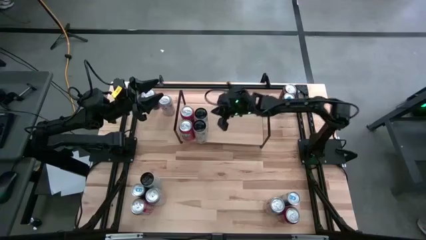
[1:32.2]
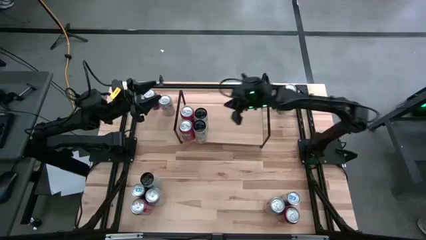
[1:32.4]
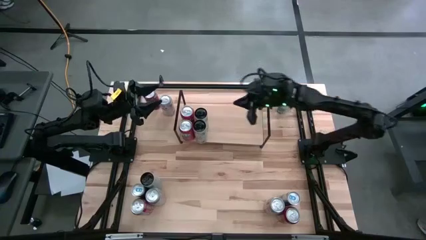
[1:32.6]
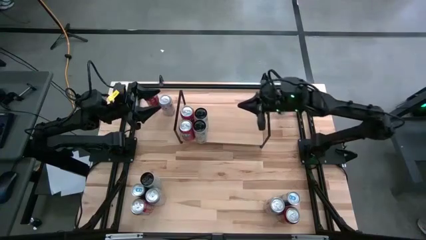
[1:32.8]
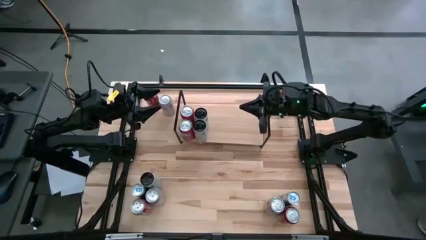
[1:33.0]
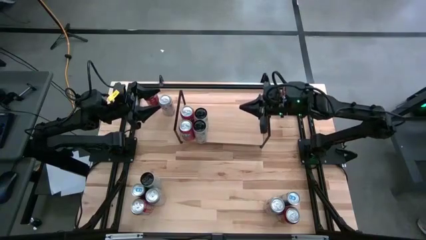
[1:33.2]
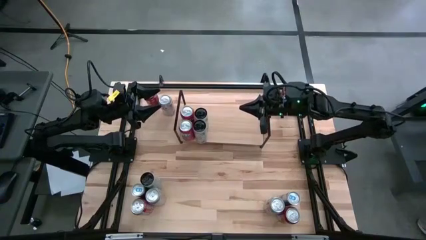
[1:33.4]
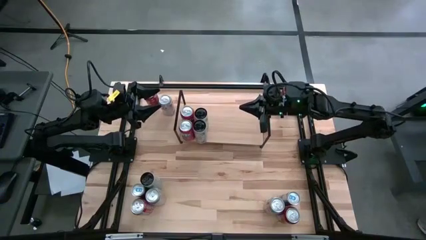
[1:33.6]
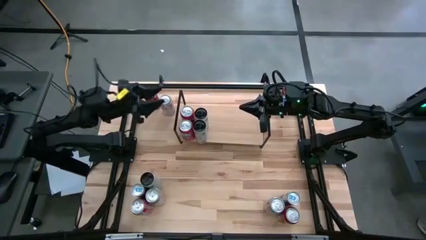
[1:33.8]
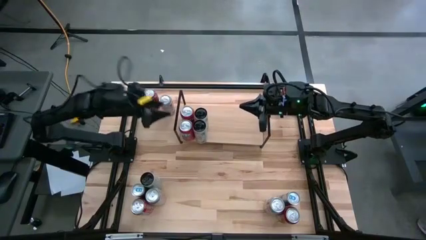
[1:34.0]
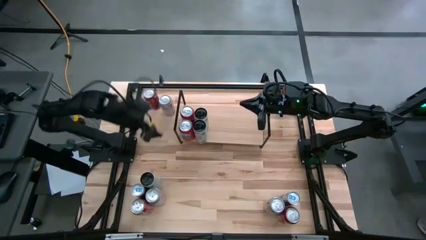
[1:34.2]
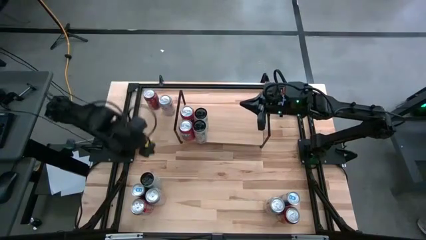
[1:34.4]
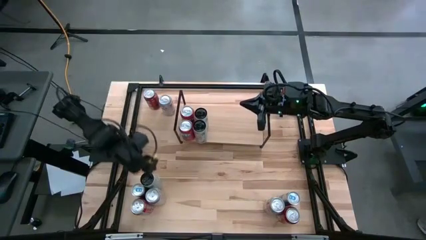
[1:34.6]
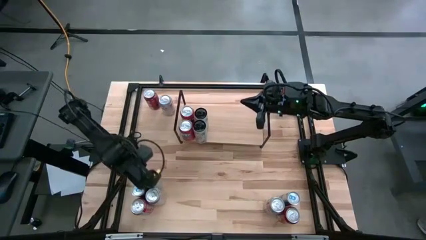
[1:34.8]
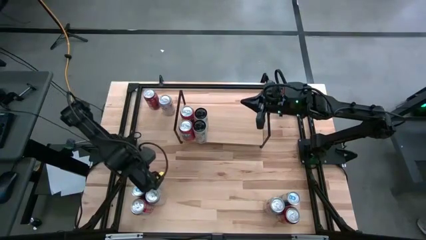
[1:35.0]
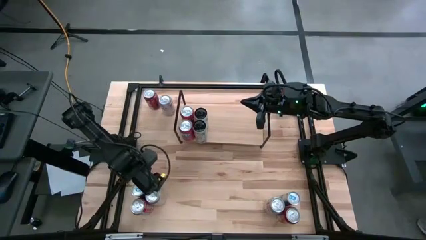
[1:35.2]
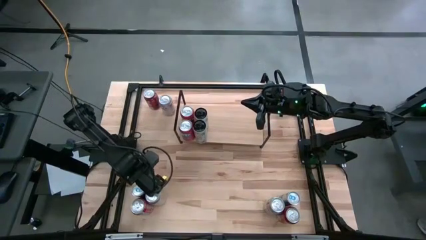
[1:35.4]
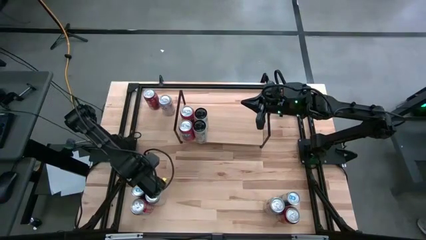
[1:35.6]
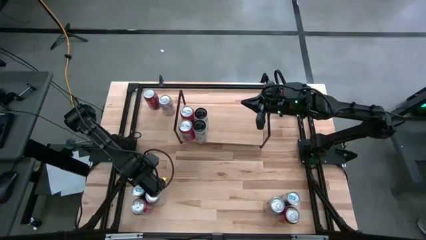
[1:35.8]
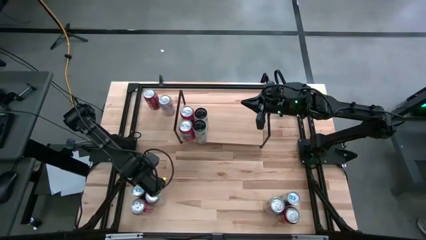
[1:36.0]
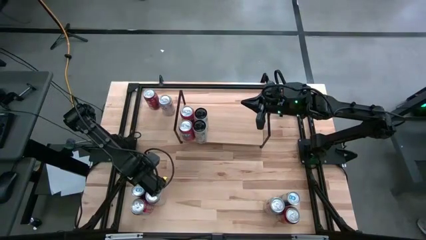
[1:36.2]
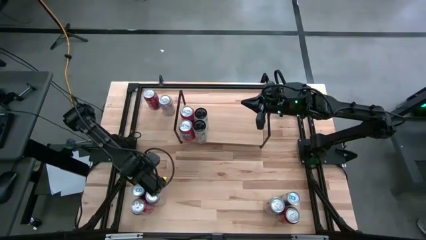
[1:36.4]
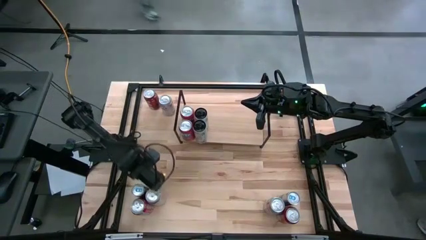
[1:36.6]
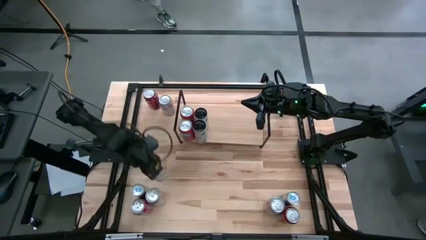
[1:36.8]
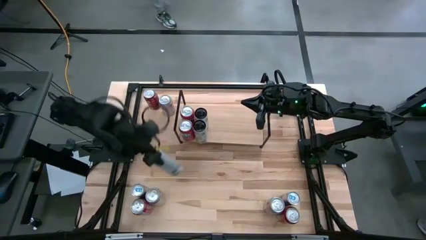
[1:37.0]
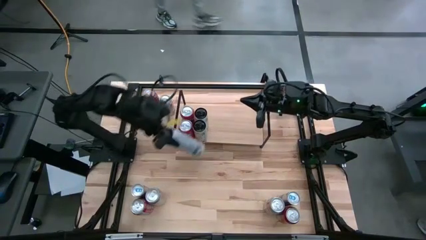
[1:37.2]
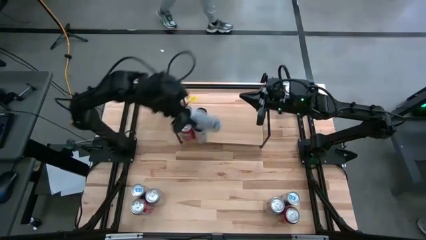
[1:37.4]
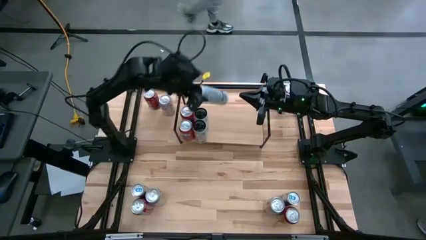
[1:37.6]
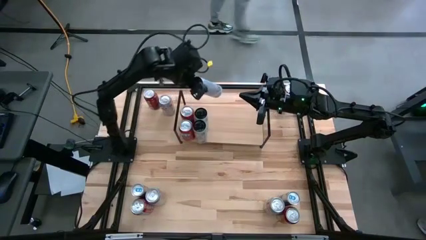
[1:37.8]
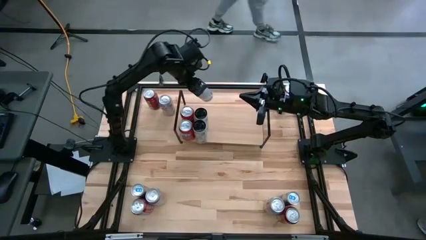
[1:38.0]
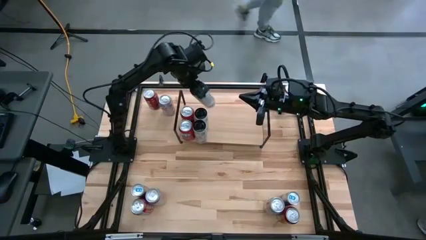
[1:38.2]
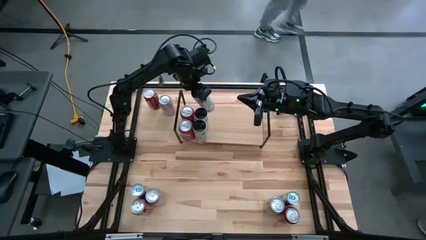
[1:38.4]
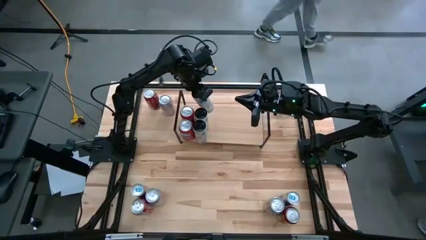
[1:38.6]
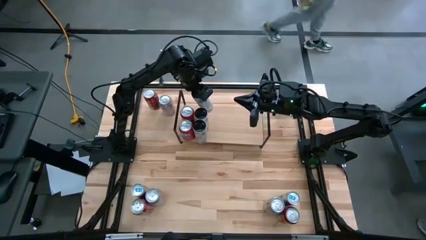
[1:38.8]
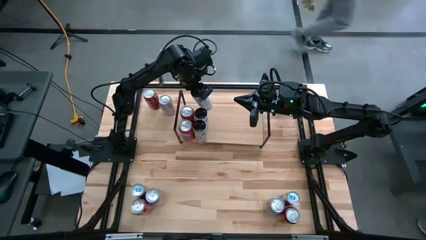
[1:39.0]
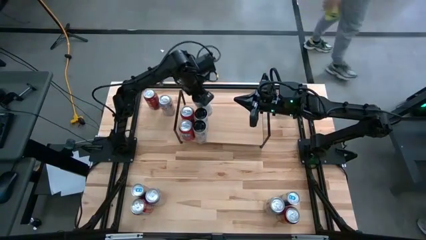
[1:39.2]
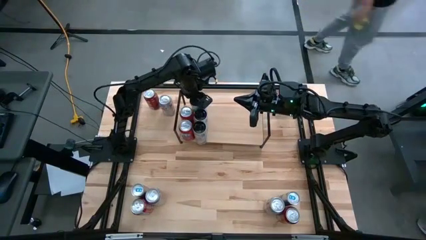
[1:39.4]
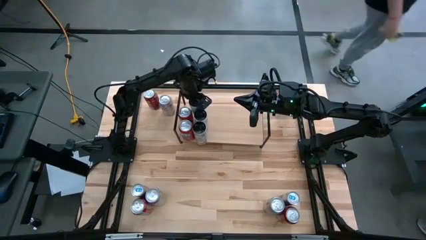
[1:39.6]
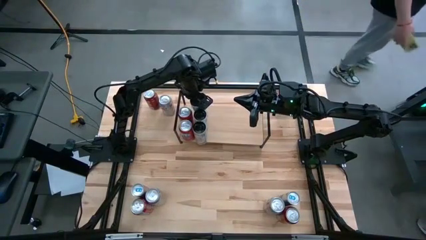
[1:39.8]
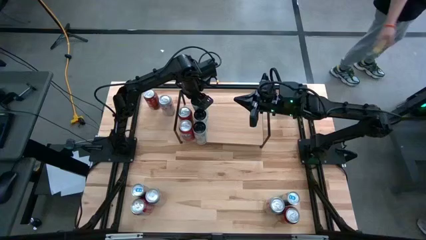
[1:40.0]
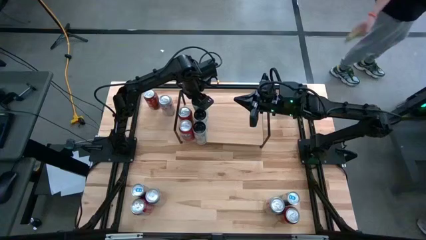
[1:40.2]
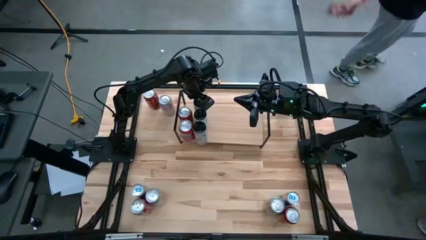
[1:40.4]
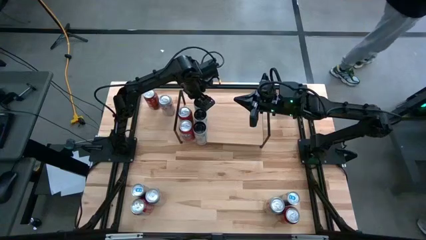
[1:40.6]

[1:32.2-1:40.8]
Task: Place canned beverage on shelf
Put the white-pink soda can on the shelf aligned with the other white-pink soda cans

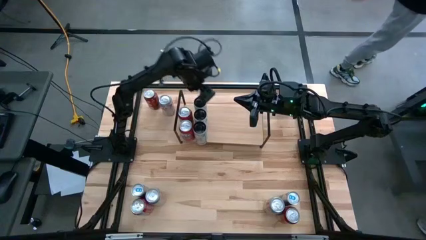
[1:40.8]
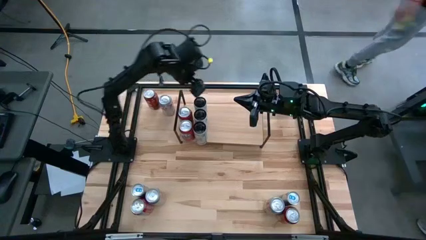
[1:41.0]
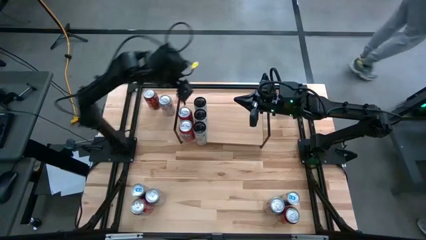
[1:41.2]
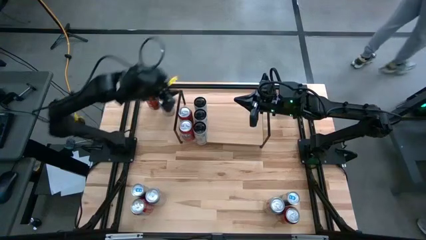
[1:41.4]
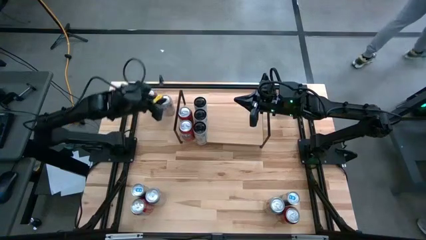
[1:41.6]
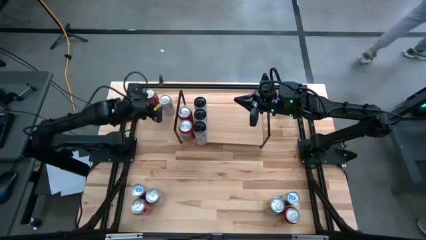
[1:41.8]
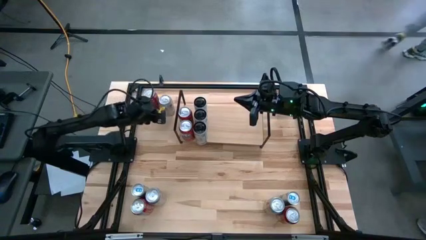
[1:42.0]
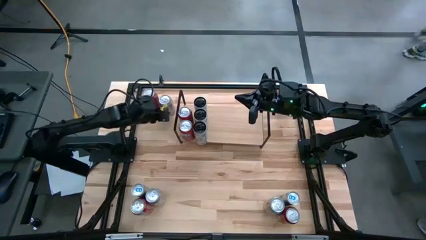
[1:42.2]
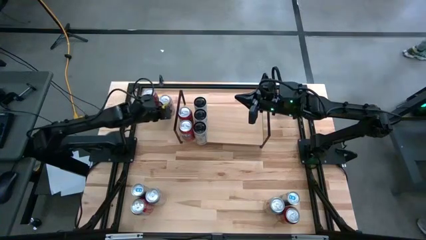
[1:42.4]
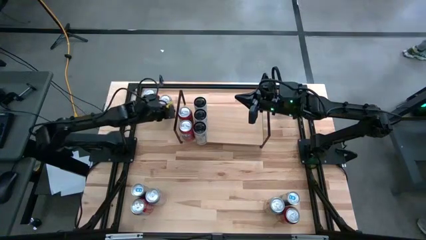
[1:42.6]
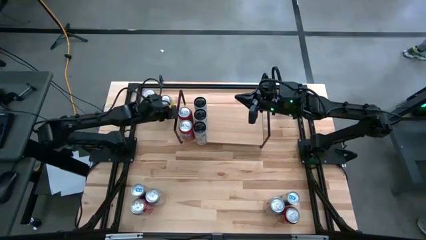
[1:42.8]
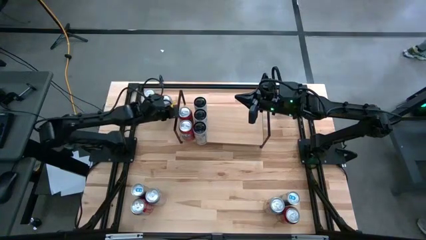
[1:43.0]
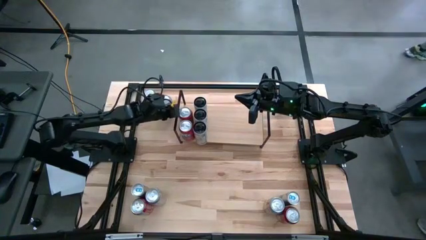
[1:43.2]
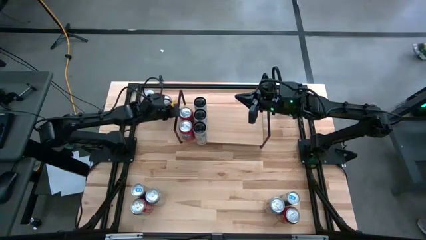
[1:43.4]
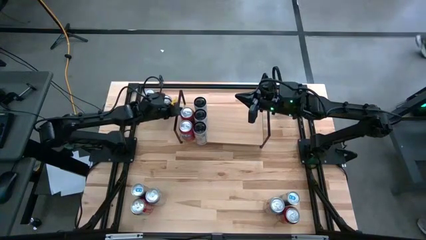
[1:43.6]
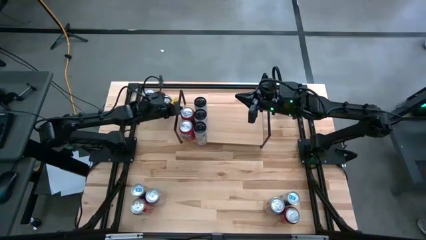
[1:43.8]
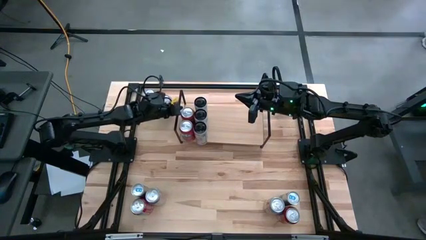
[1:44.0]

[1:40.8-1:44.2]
Adjust the red soda can on the shelf

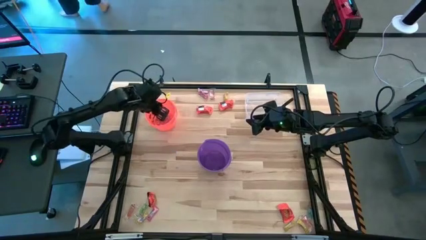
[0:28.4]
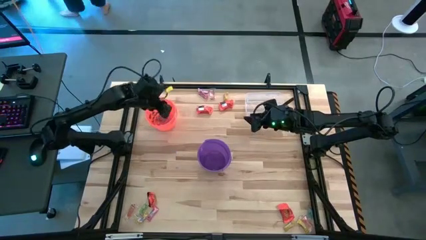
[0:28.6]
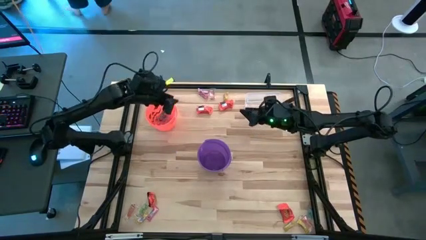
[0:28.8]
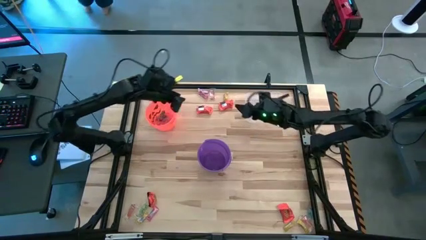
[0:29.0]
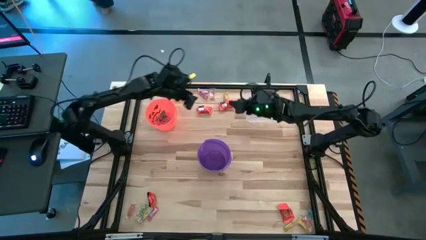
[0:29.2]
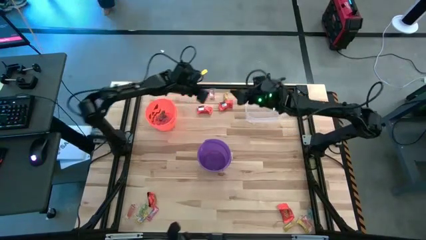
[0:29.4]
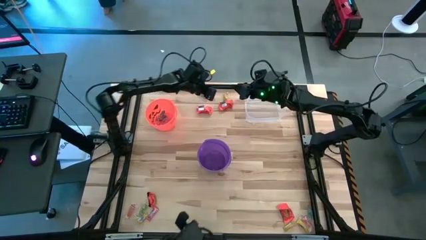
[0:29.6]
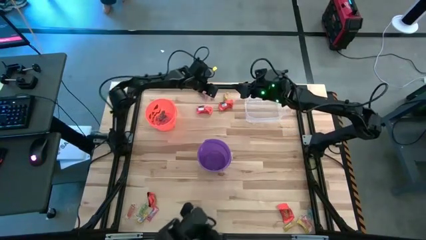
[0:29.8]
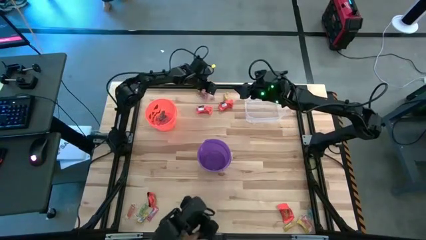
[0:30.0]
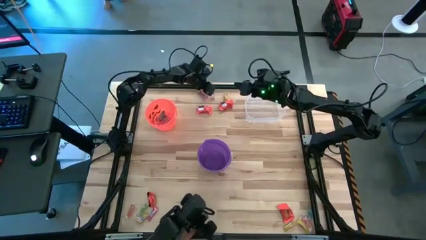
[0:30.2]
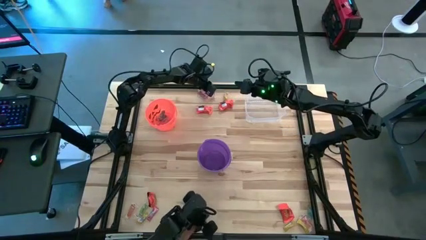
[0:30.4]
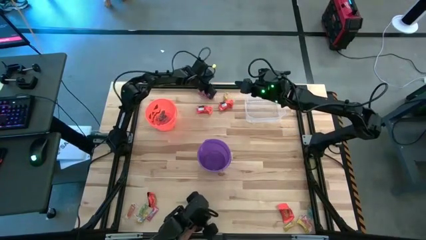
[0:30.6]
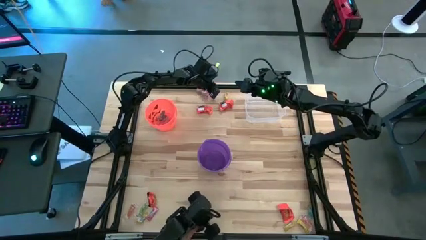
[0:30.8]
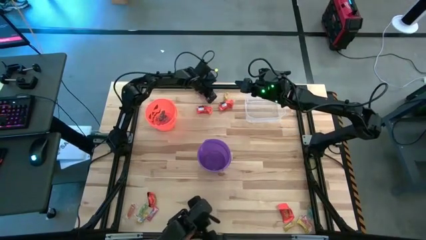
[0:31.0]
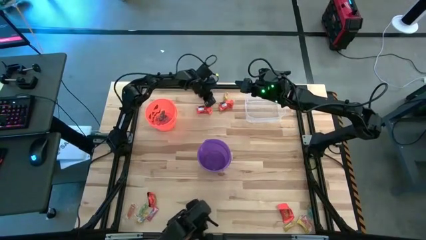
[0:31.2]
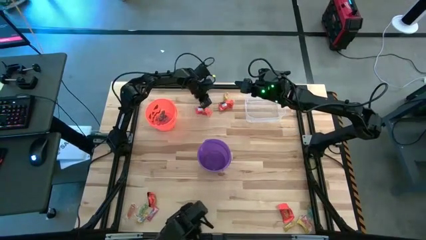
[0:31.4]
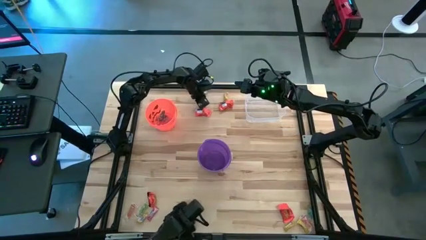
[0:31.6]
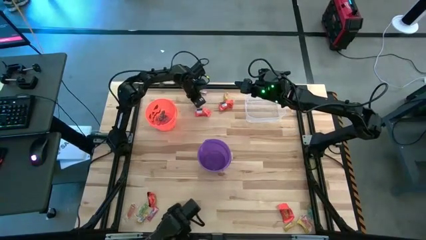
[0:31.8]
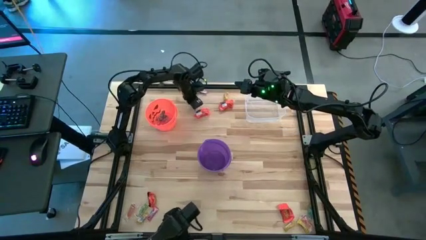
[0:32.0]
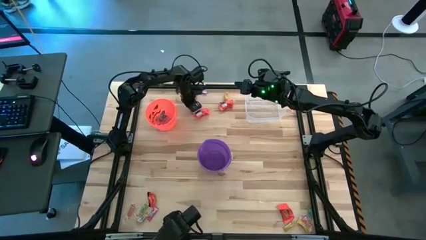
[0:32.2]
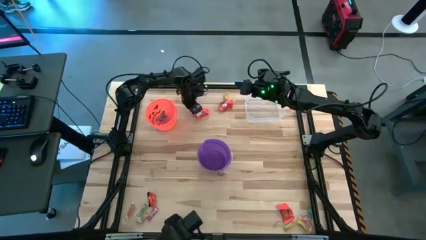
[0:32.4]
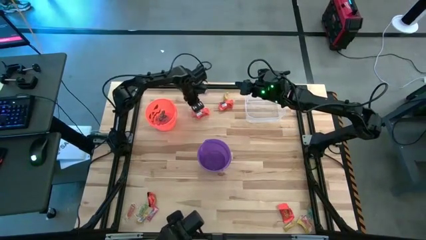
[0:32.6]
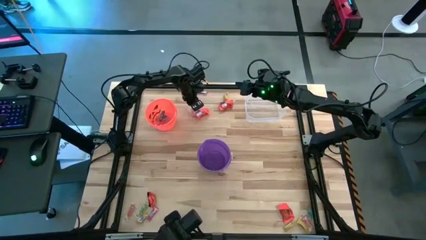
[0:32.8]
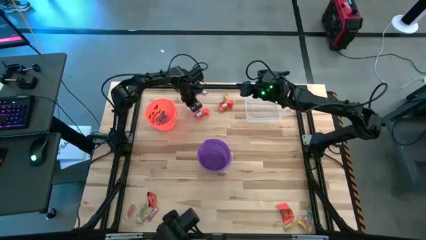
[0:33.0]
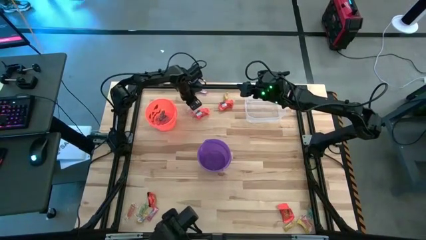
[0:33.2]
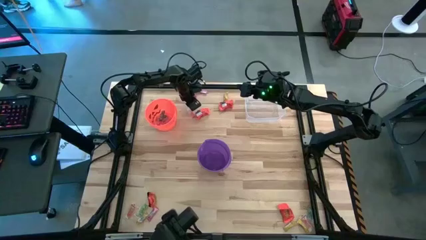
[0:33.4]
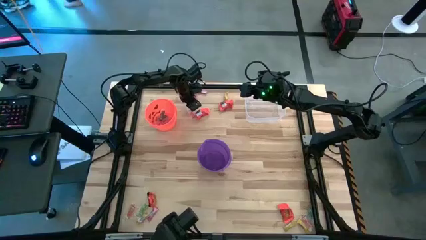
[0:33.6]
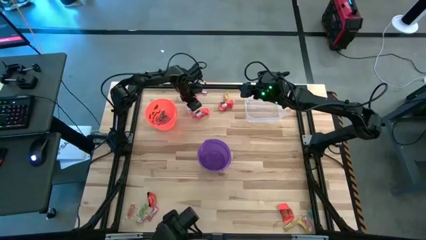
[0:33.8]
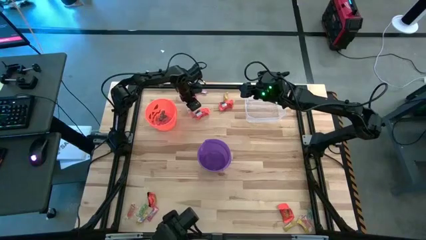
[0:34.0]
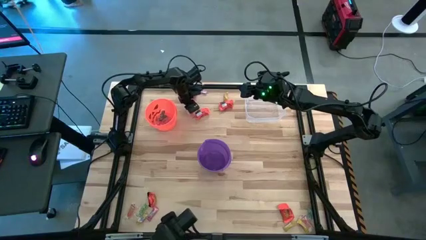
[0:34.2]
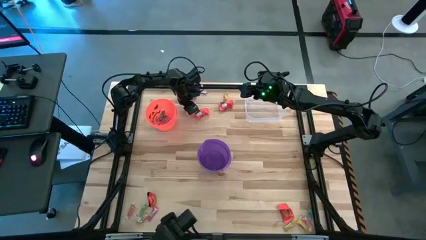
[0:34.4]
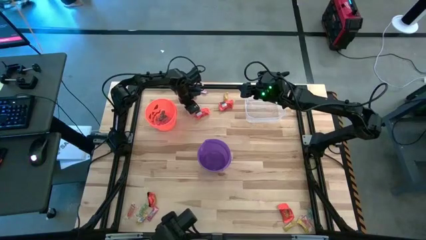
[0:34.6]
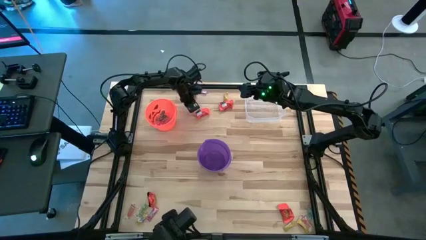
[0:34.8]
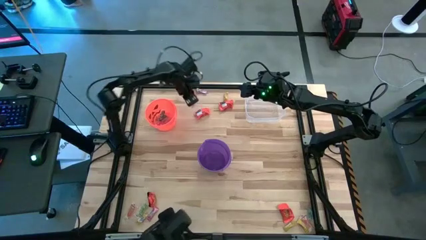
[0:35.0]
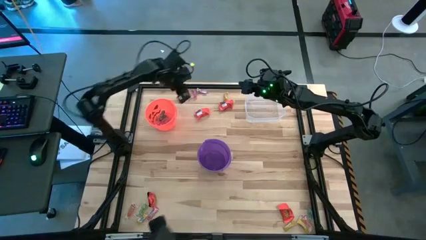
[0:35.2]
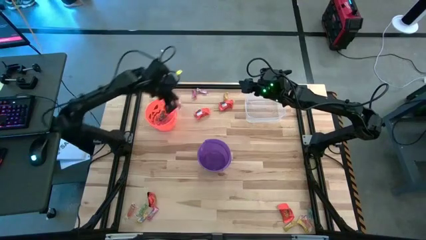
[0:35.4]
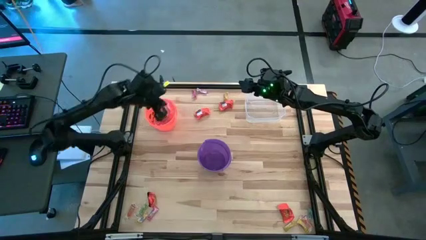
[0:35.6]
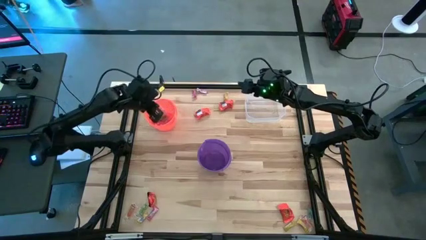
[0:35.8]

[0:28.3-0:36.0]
Task: Sort candy by brand, put in halloween buckets
Put the orange gummy into the orange bucket
